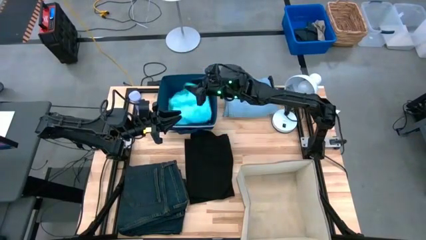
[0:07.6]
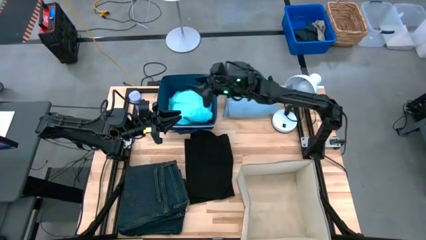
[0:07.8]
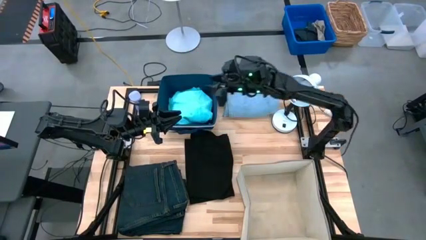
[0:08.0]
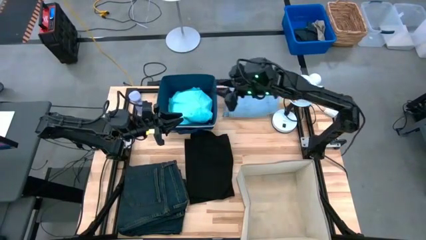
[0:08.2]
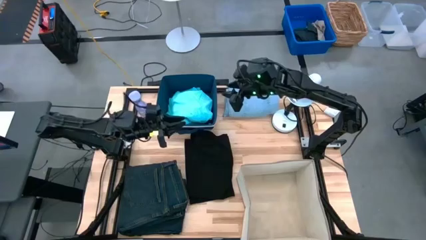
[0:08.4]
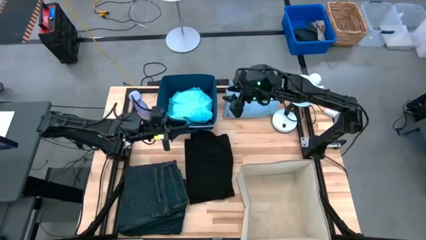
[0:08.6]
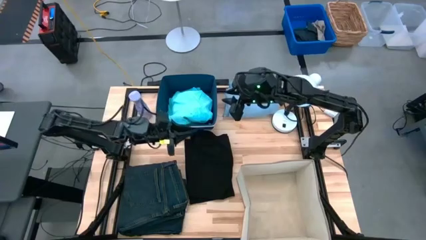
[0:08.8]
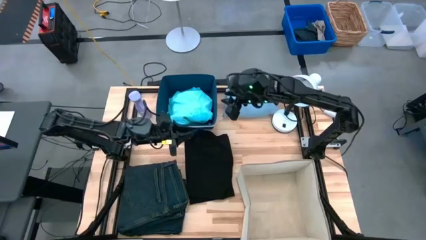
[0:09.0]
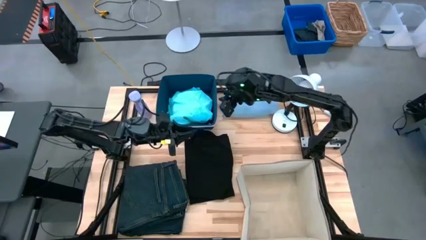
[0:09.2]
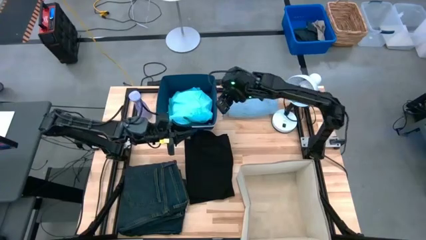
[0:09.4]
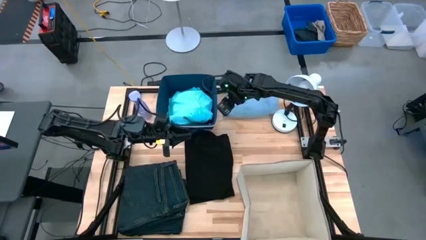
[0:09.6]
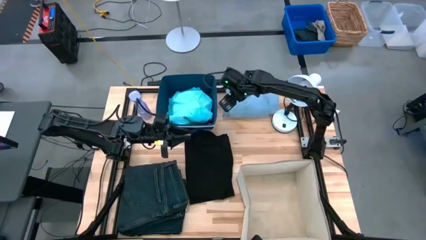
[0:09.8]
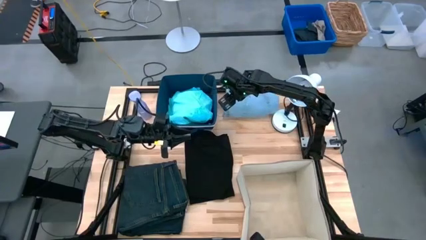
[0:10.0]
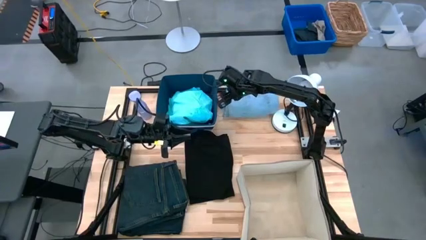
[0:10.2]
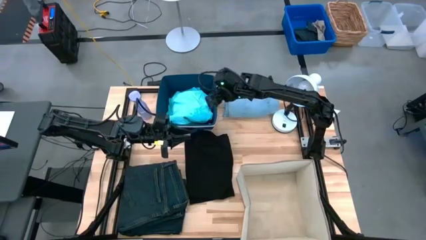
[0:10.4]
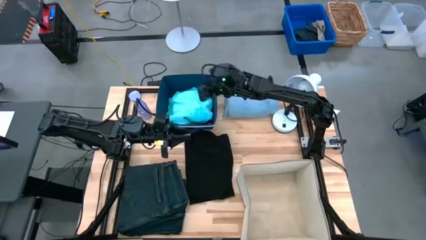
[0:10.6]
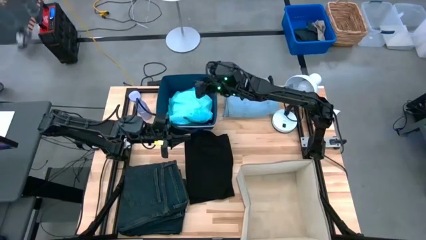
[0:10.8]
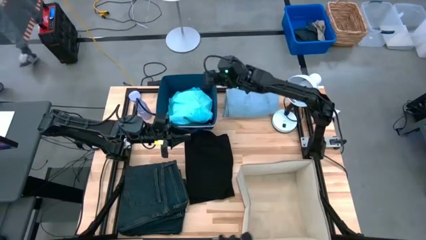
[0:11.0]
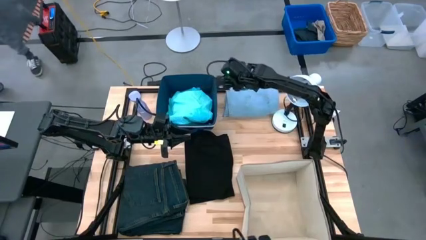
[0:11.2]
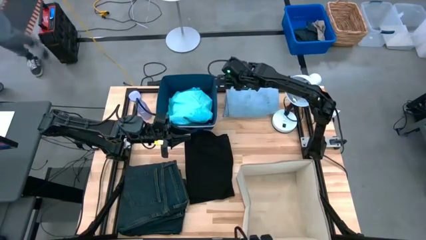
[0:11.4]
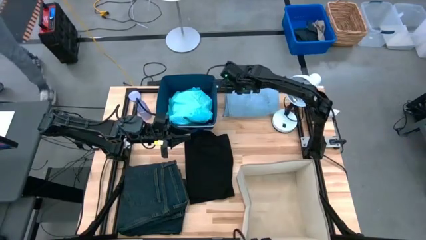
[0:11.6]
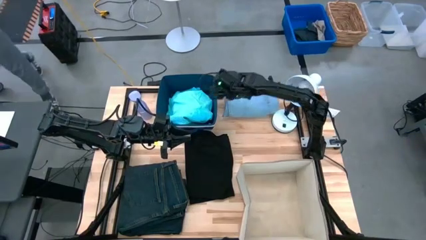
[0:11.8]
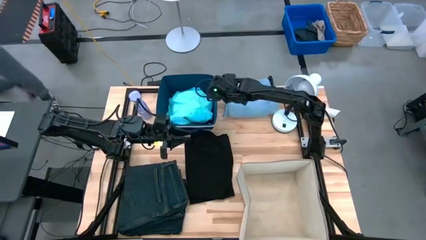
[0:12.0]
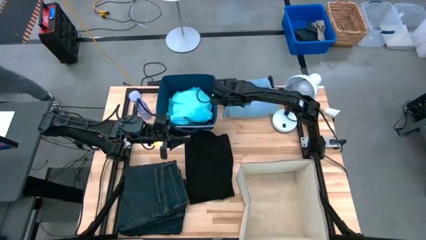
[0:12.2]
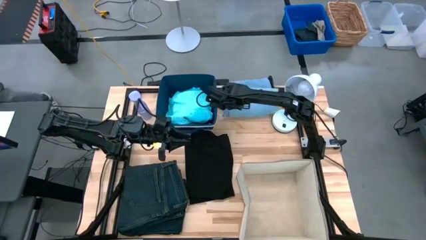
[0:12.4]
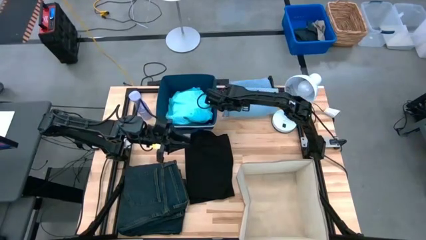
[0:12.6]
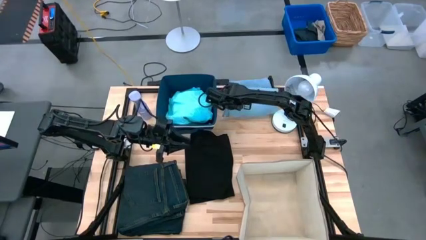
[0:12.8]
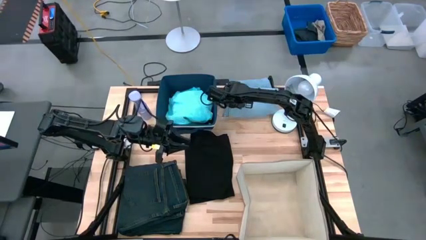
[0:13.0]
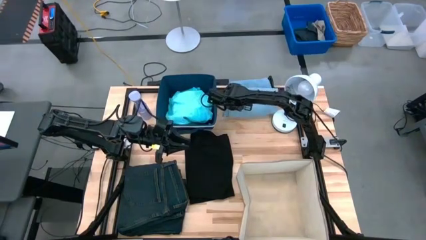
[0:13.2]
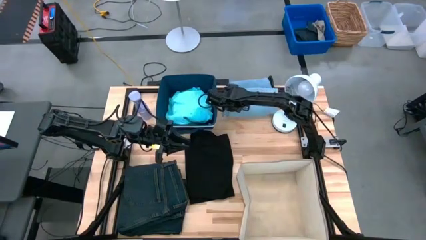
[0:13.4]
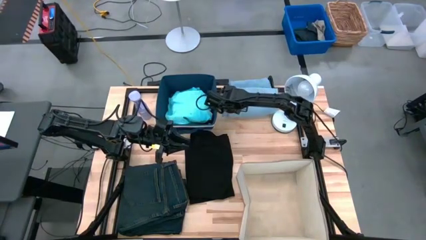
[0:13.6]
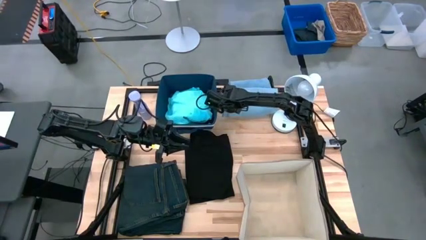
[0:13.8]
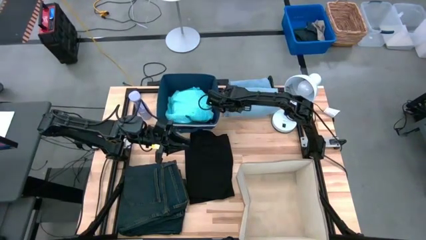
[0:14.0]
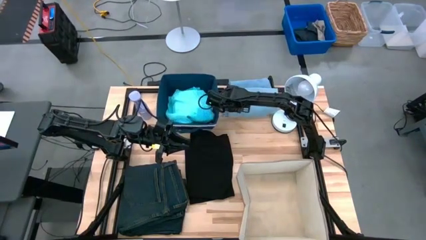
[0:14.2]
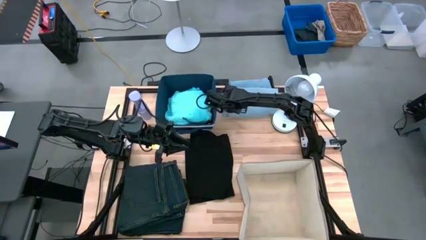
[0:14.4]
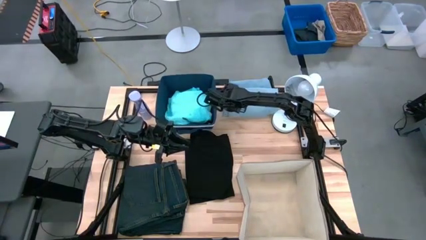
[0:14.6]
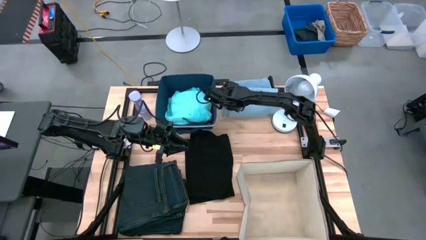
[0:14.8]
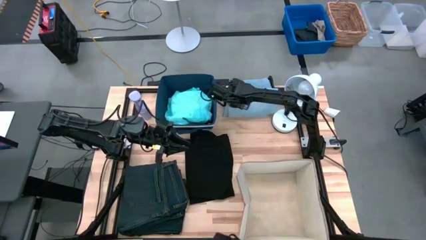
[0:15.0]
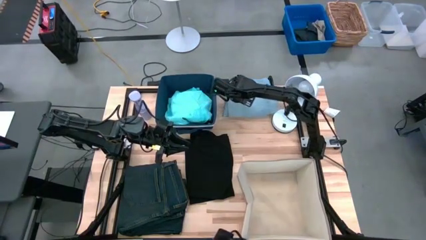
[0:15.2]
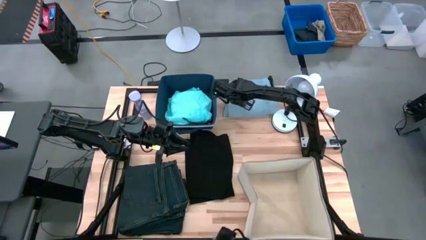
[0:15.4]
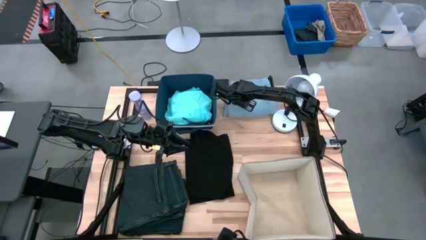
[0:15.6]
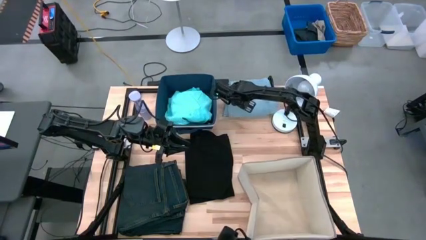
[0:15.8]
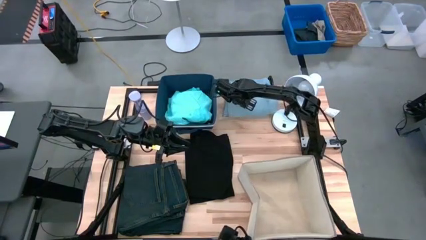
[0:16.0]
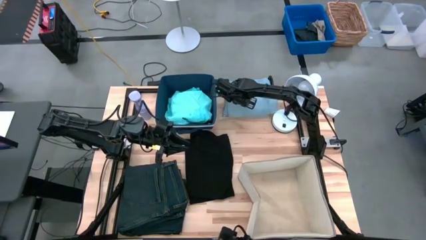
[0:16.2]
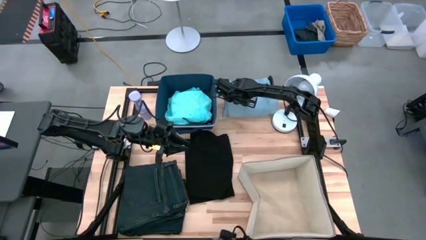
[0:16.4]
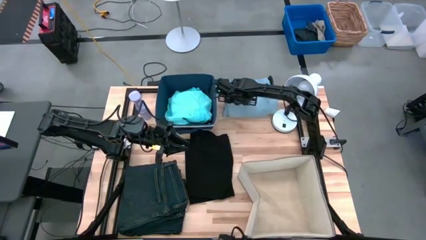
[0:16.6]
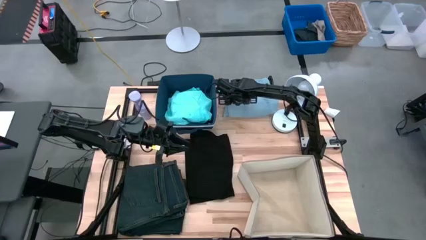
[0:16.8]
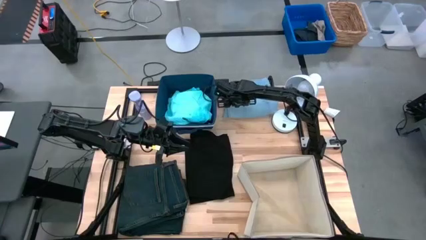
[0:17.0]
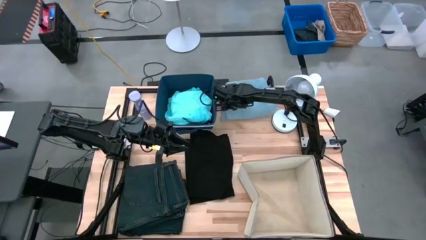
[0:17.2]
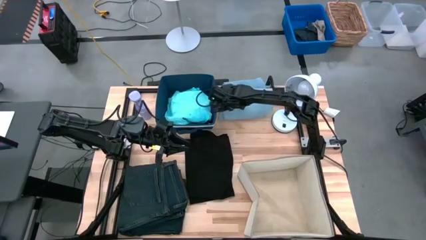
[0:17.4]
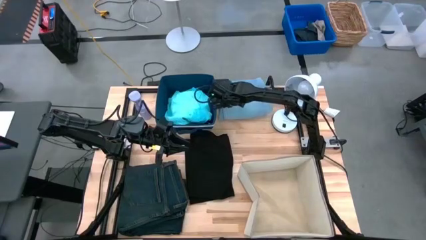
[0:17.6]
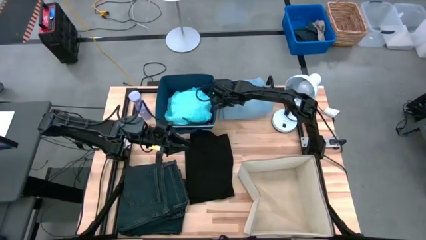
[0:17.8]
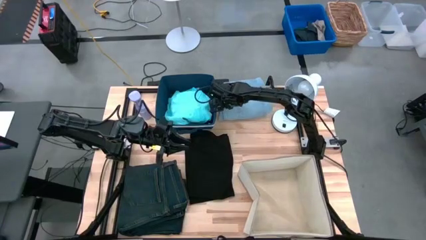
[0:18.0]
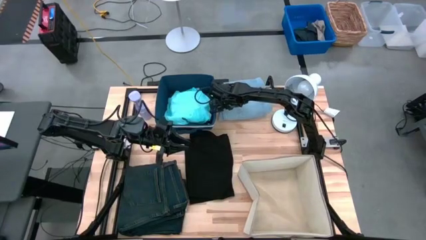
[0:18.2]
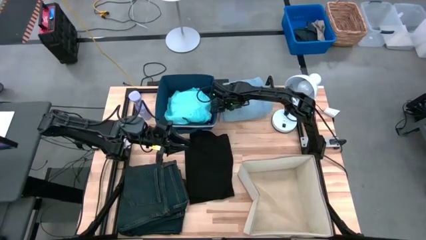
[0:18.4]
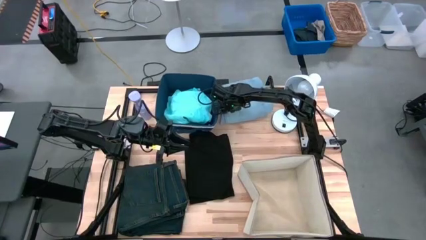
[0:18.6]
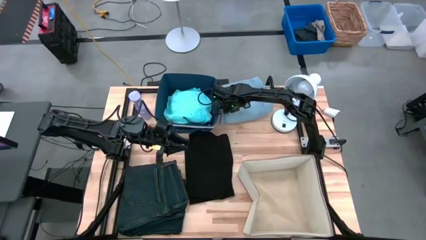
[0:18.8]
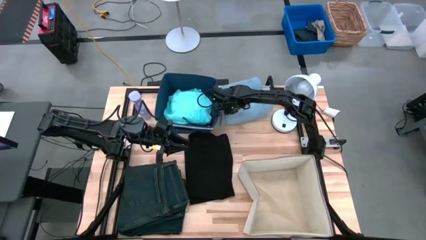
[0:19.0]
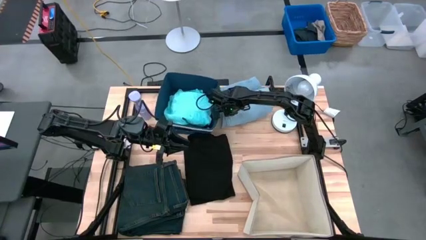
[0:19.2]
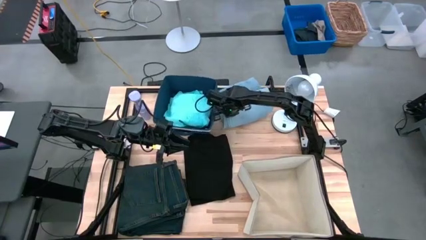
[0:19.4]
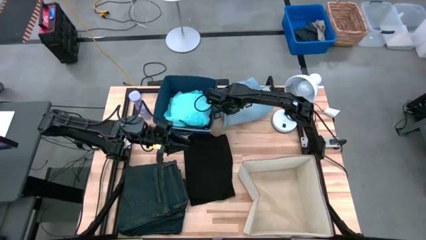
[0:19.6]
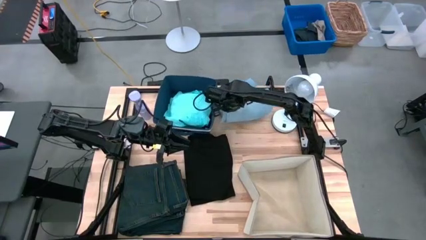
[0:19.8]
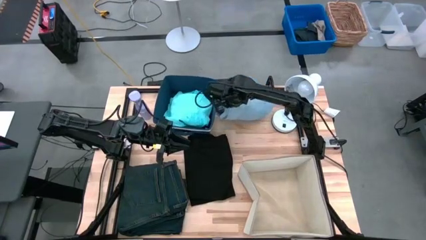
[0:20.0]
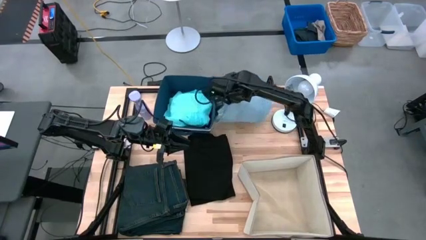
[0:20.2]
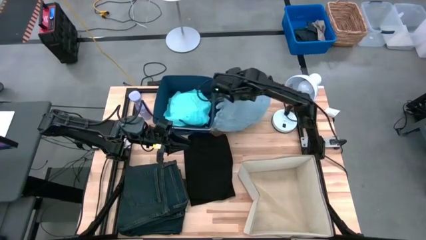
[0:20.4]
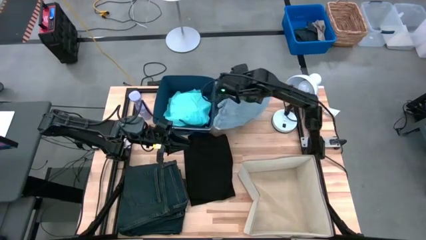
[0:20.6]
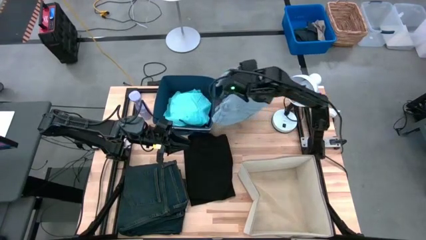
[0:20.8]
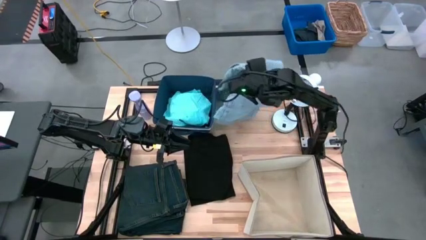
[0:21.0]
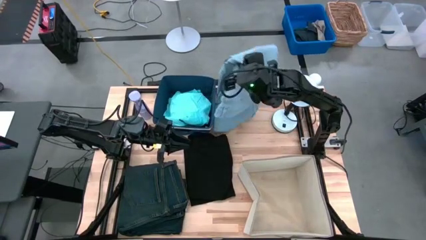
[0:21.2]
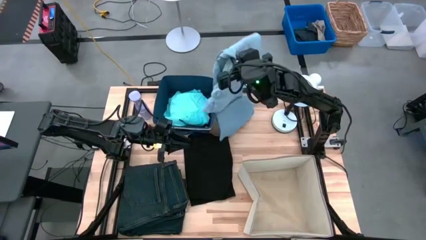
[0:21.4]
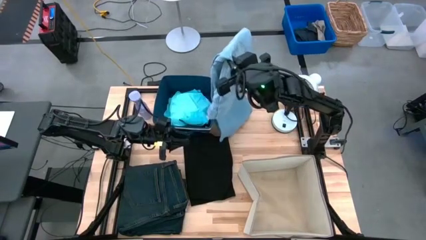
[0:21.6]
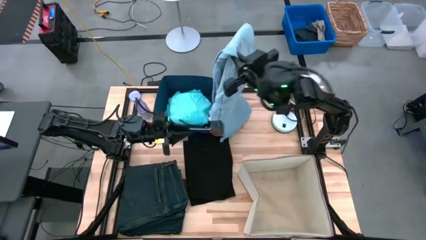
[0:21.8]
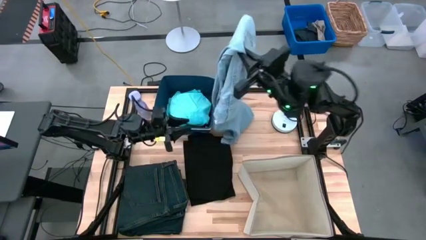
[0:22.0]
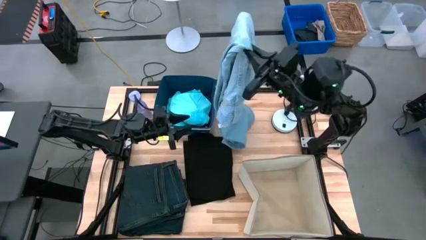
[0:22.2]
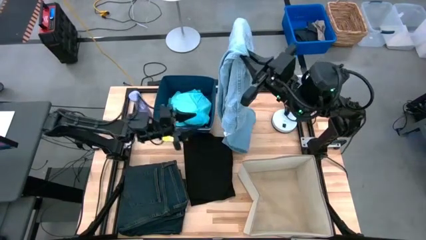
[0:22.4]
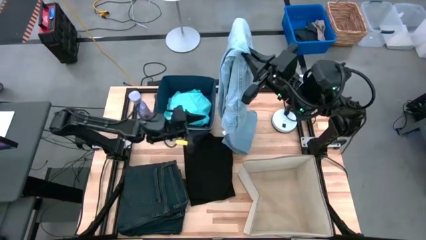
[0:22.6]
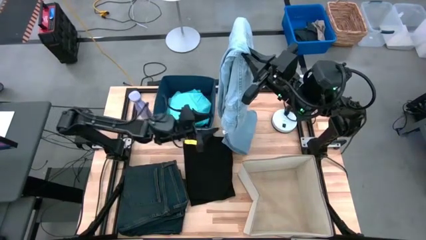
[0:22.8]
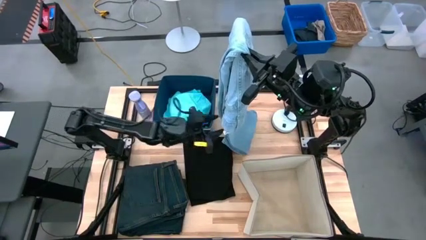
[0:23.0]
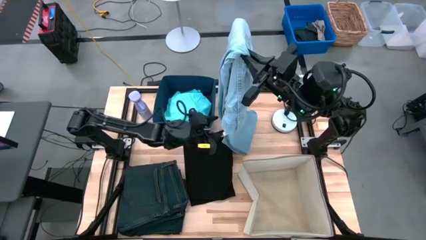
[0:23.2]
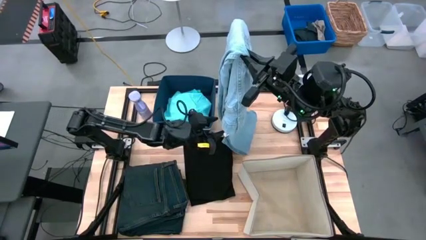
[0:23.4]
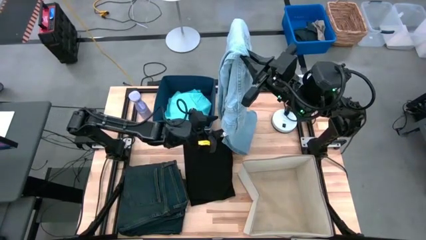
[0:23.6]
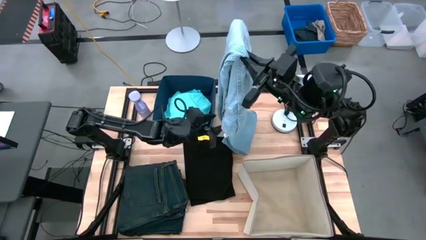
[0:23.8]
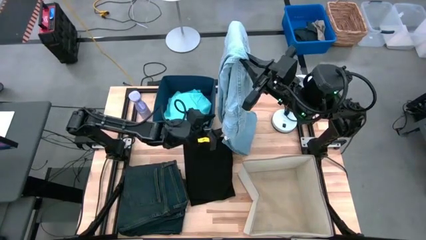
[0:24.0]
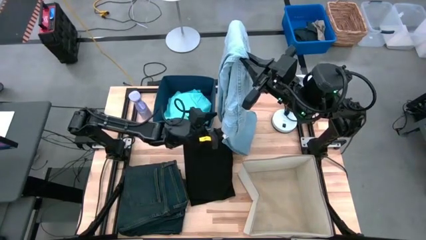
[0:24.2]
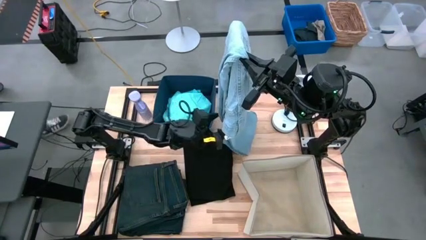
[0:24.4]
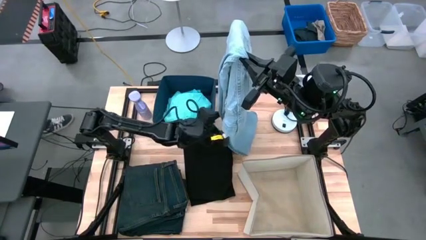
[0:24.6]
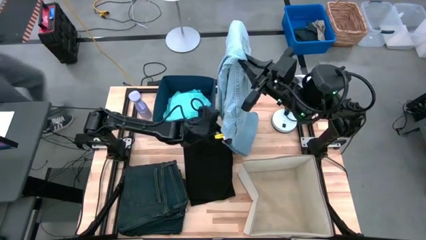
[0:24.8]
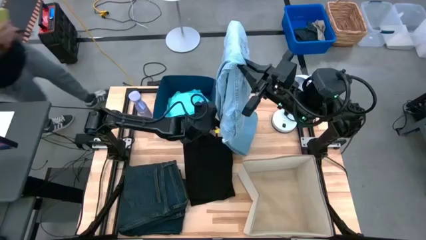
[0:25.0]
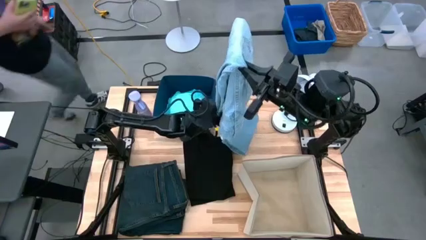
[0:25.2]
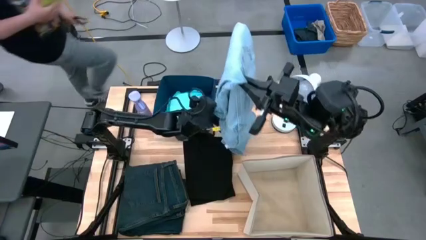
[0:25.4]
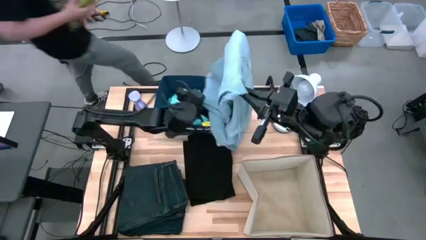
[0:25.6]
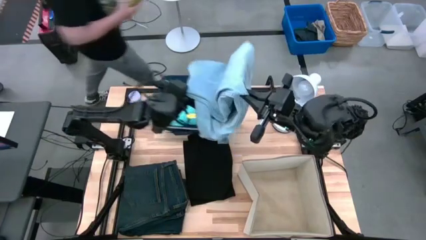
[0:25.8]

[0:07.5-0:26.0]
Task: Sort clothes
Put the gray pants into the blue bin
